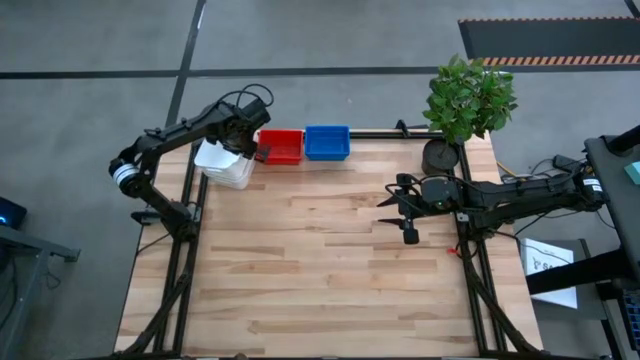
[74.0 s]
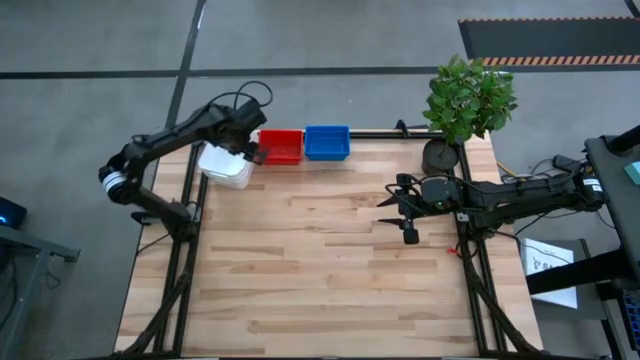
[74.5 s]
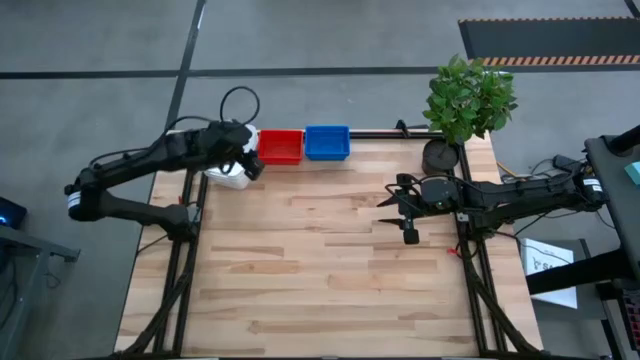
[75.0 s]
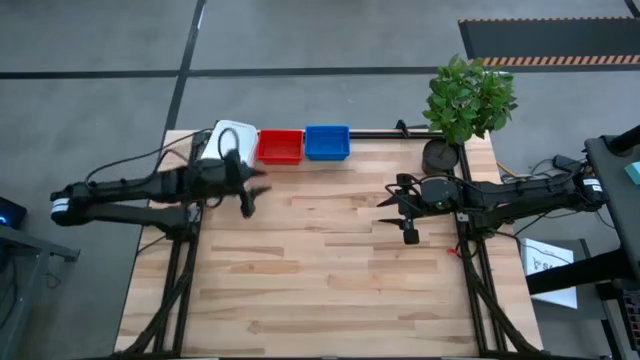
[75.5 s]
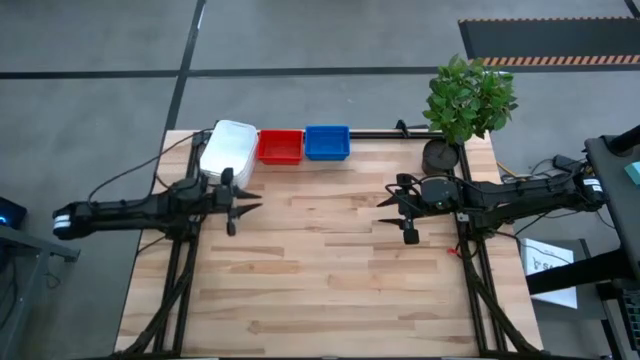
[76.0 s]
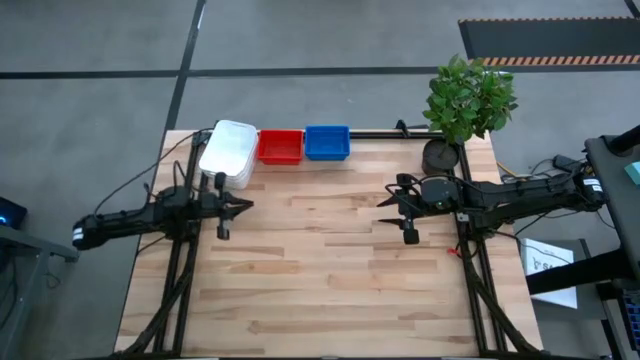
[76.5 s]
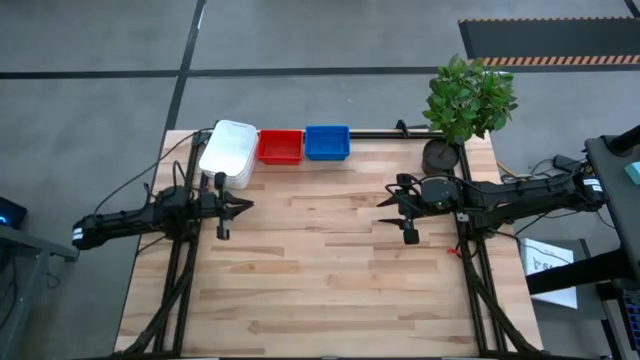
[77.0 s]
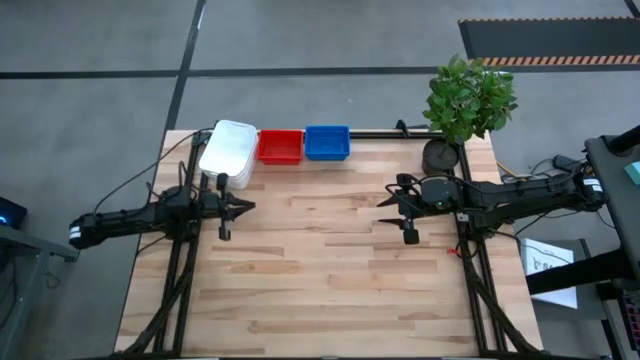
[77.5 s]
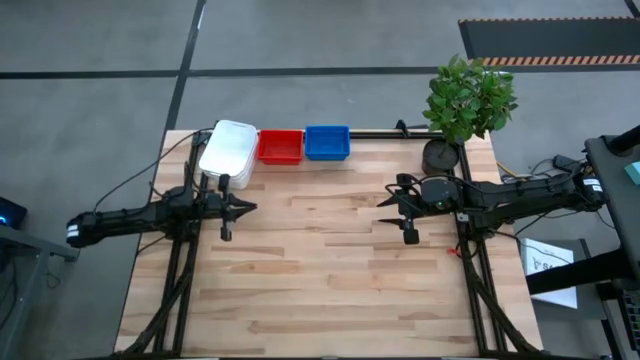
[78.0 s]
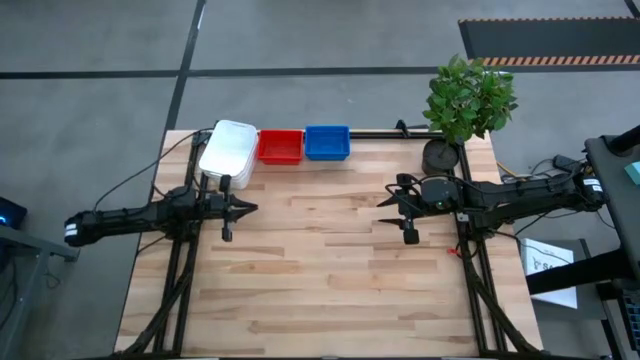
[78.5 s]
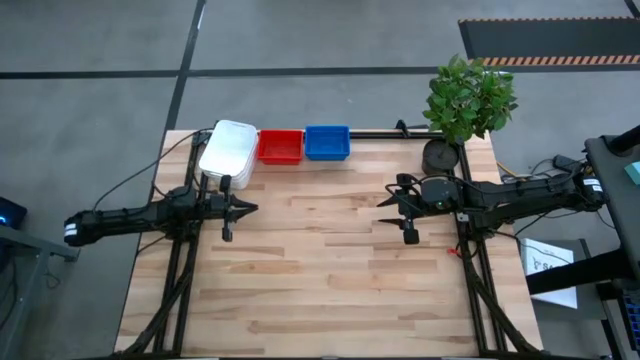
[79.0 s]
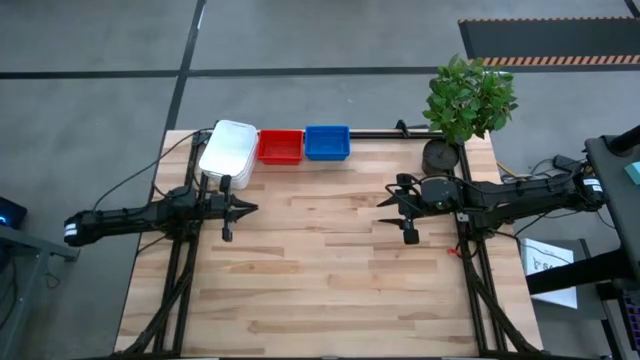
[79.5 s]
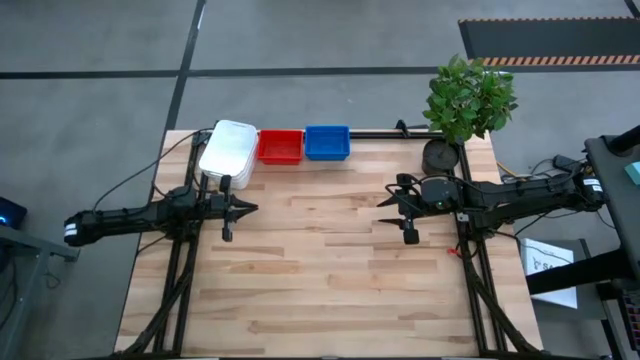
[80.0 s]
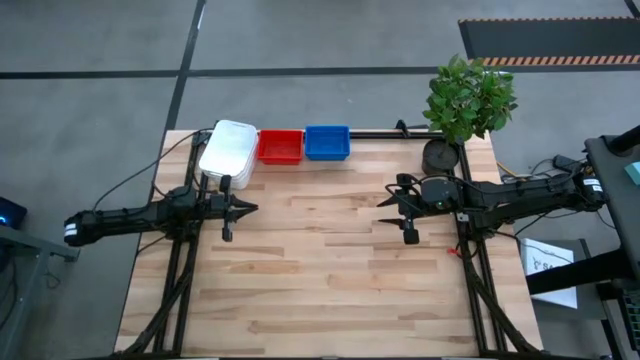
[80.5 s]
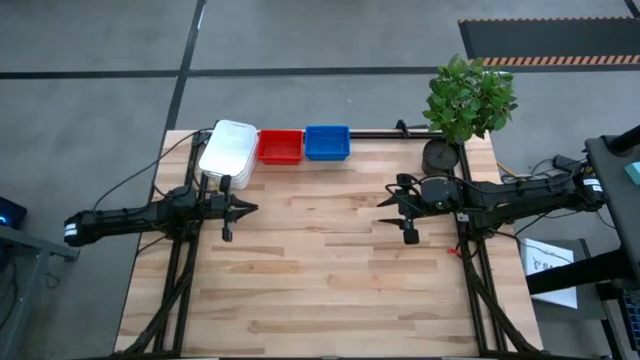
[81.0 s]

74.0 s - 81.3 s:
Return to Home Position
